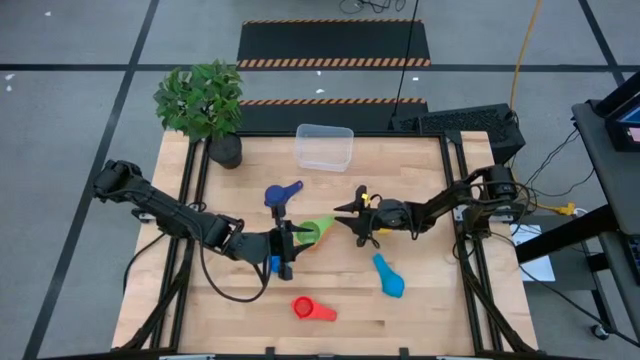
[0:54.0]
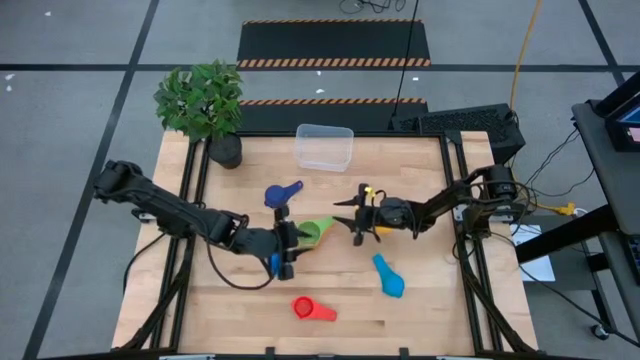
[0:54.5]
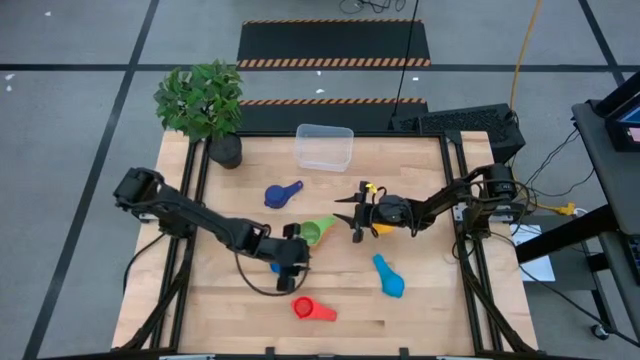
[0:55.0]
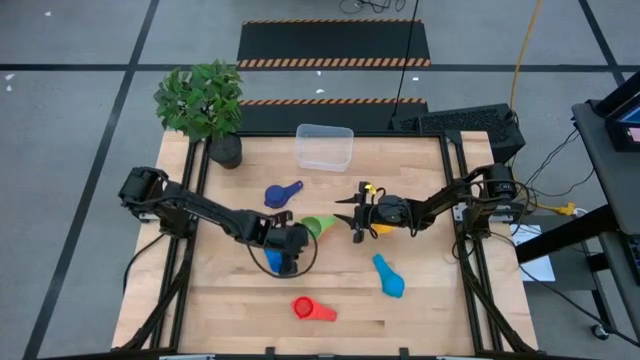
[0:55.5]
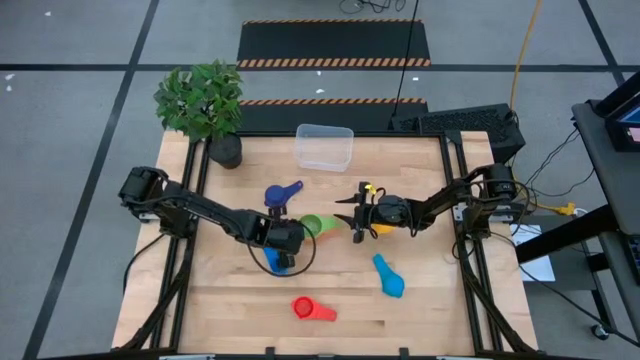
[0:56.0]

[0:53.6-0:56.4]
Task: Nest measuring cups in basket
Adjust the stacked measuring cups on the table

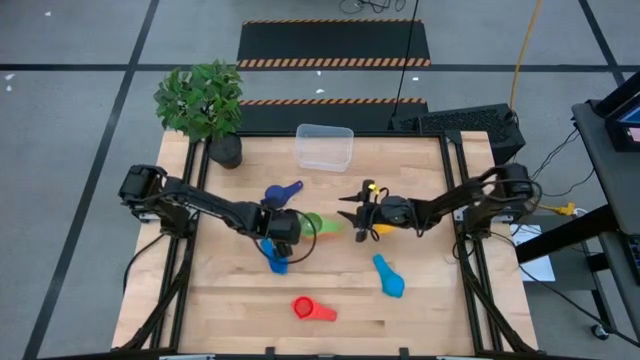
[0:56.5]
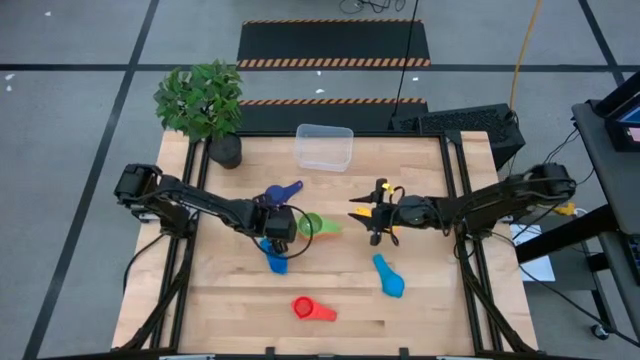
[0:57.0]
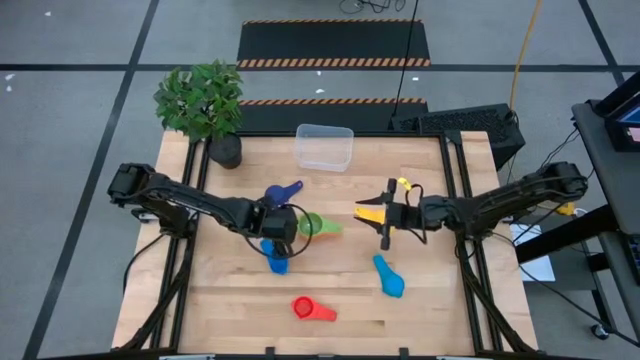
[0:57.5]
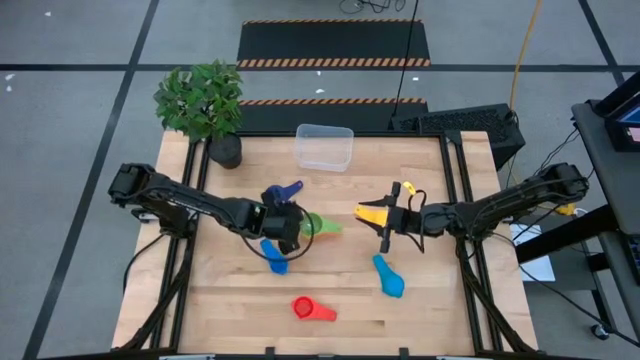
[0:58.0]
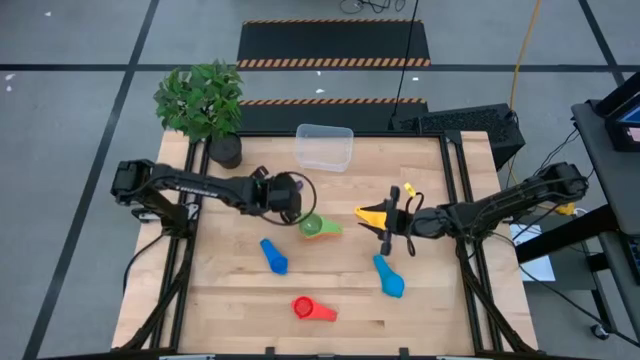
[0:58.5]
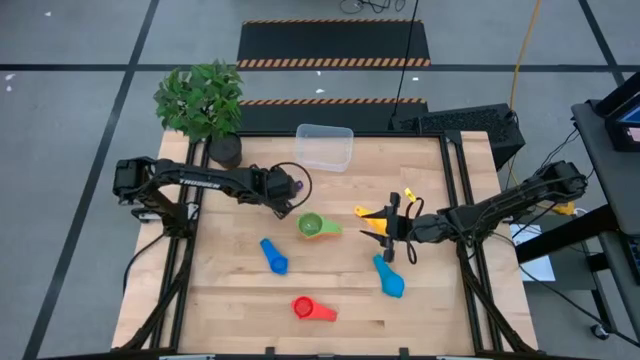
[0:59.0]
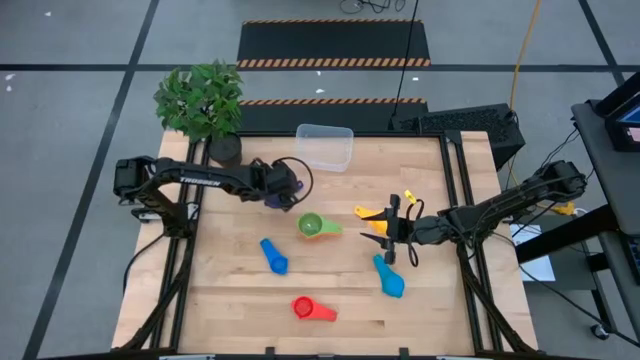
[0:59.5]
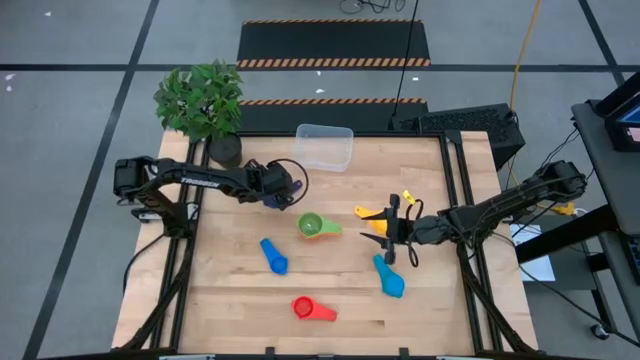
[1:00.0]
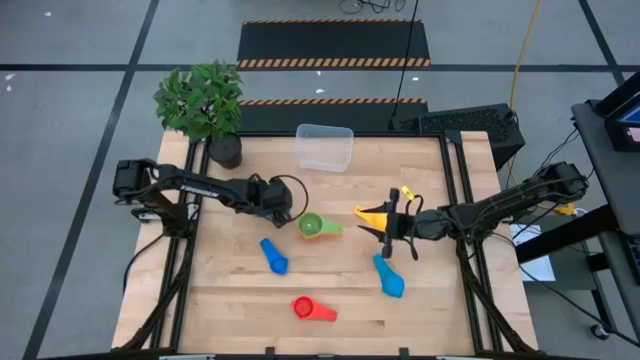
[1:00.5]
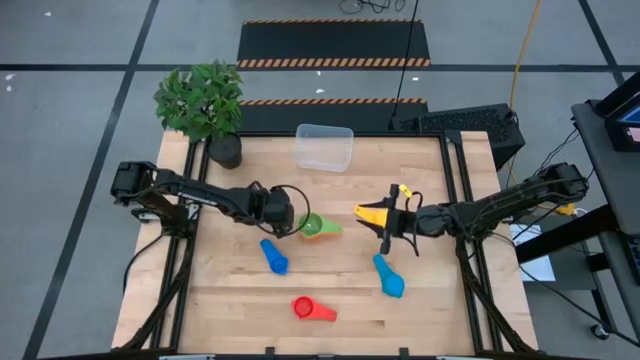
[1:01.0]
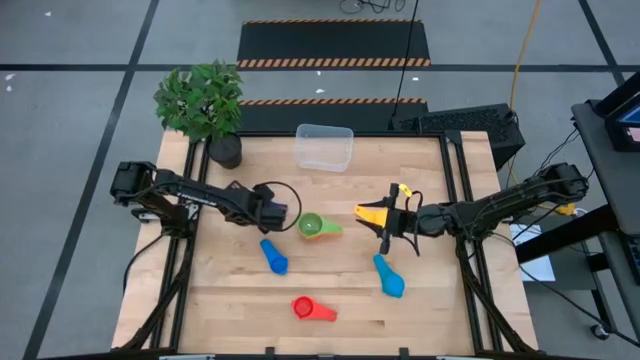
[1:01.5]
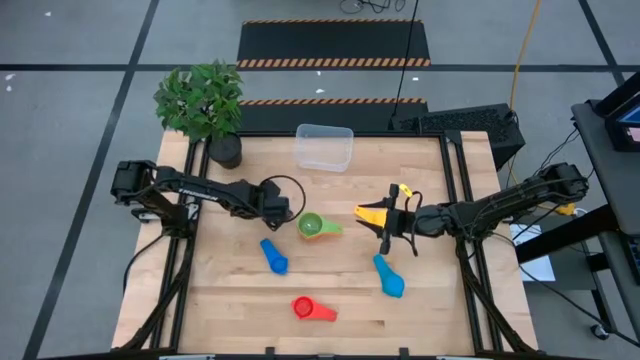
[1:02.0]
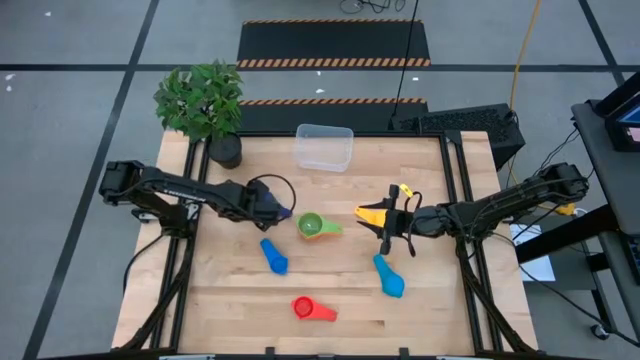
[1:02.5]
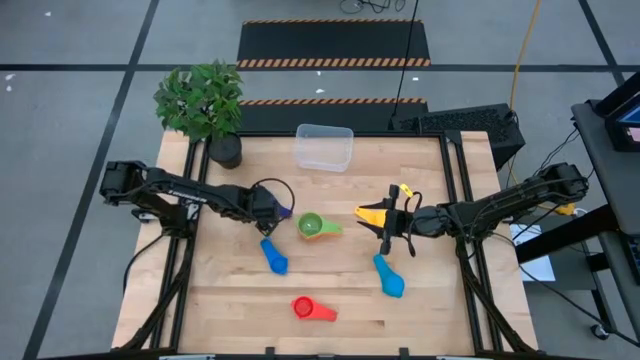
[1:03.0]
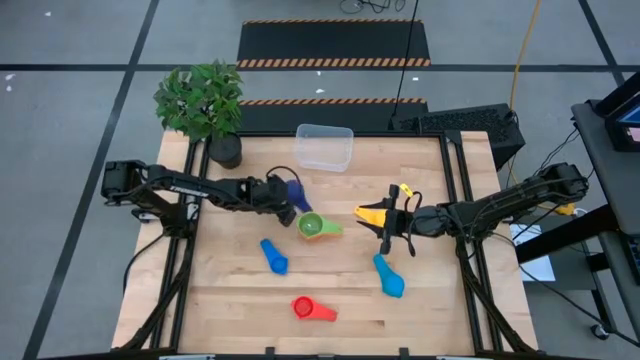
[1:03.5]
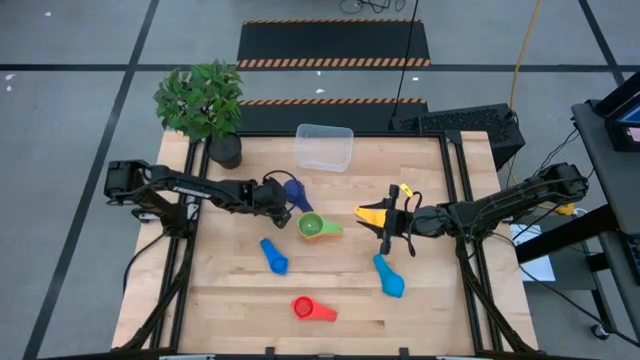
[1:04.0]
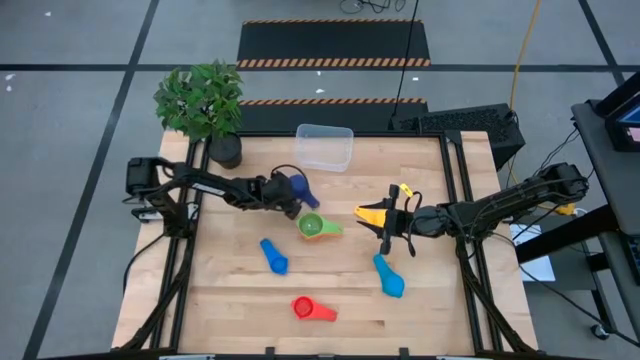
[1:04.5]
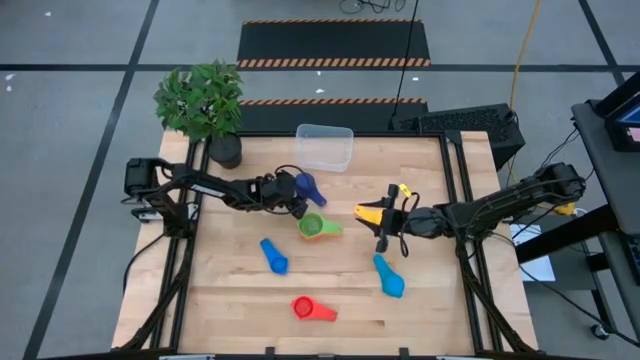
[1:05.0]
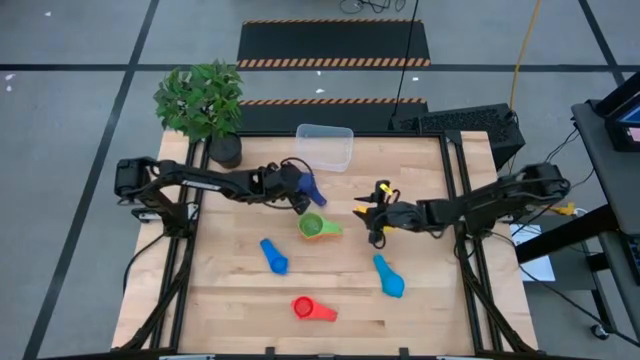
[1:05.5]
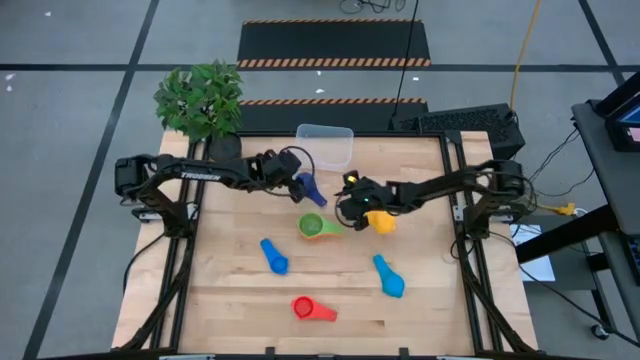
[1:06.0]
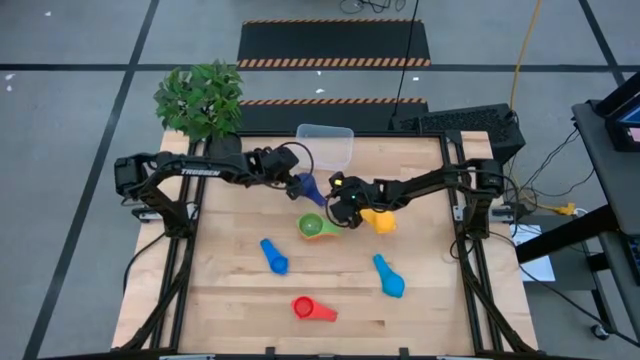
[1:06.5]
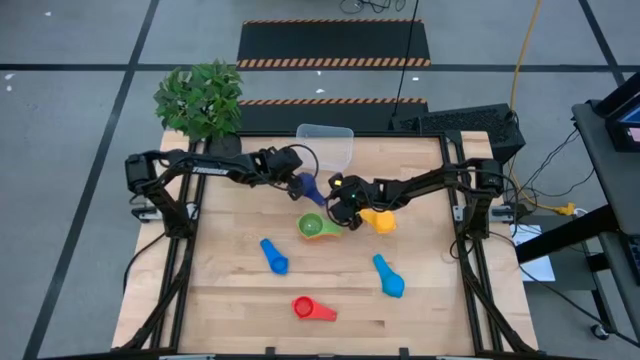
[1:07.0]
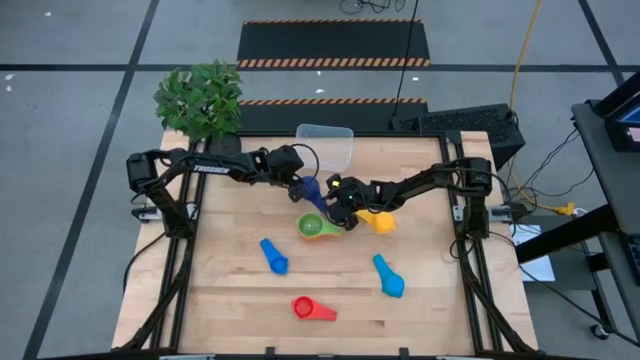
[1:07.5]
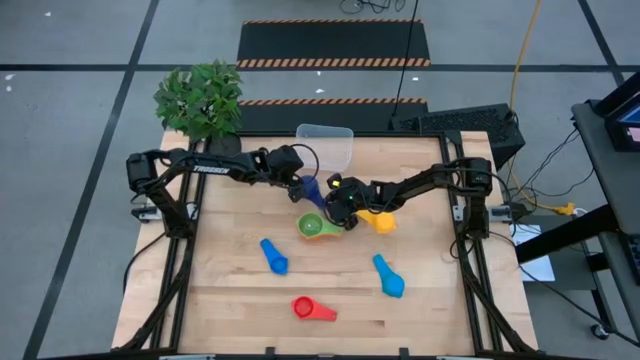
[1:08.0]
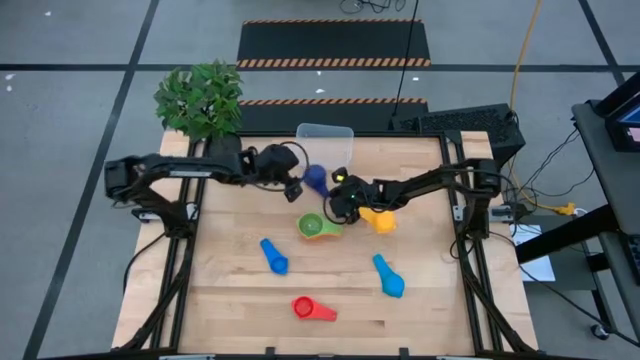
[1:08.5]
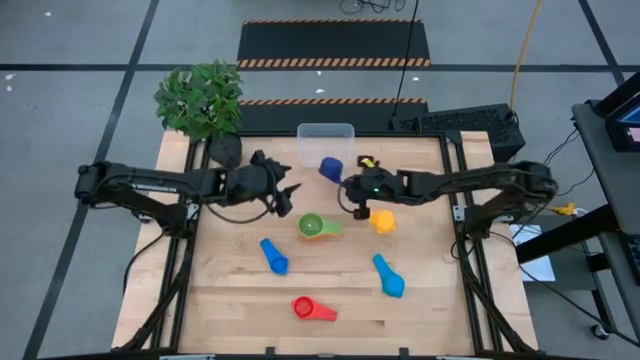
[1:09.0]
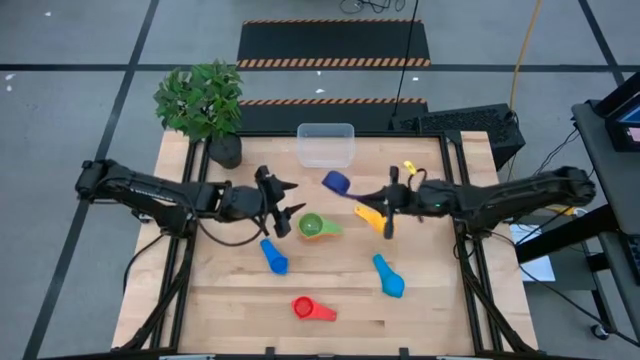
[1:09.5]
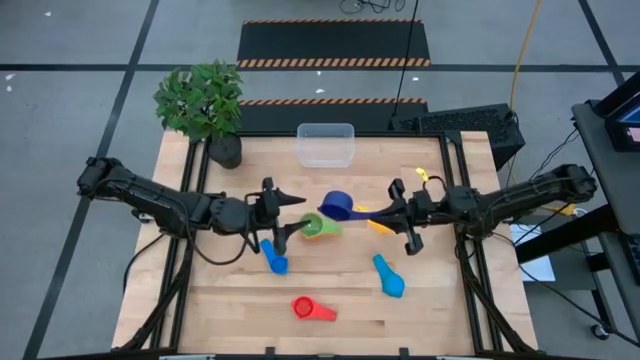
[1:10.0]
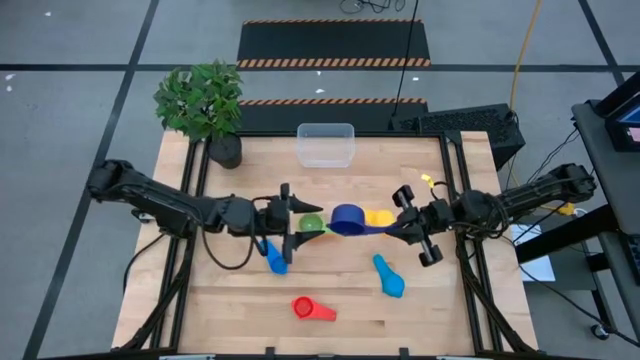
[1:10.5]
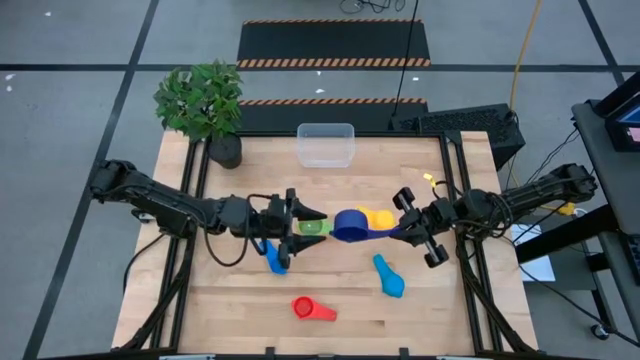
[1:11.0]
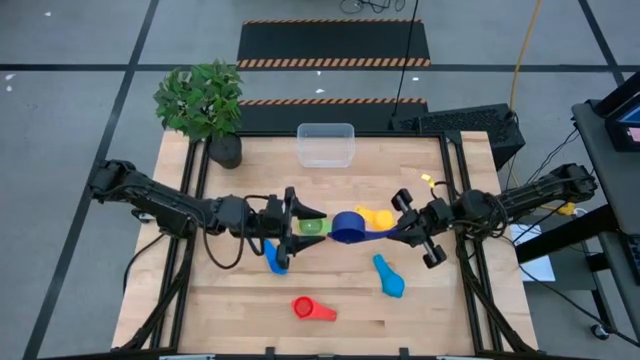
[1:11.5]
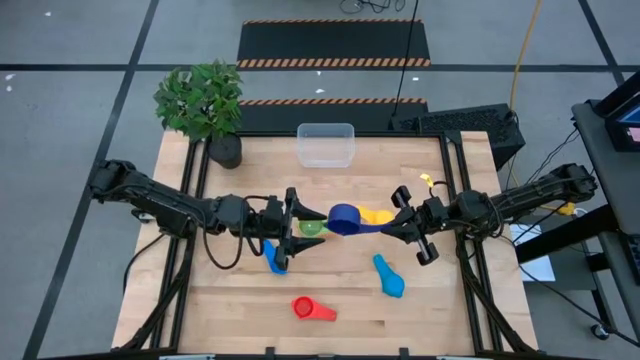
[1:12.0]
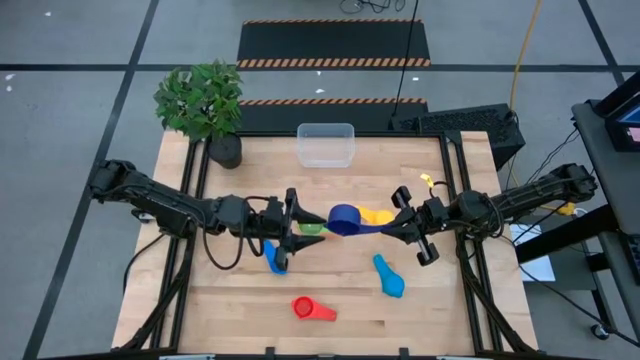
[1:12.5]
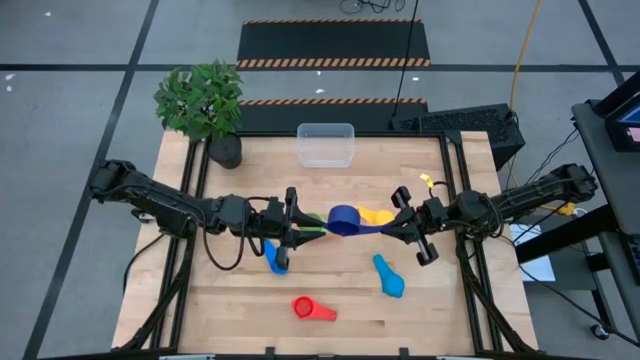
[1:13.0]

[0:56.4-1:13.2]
Stack the dark blue measuring cup on top of the green measuring cup
